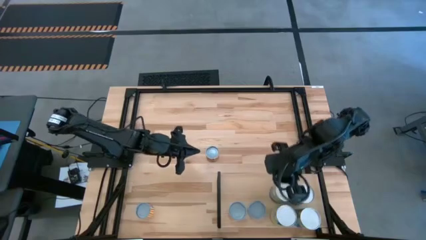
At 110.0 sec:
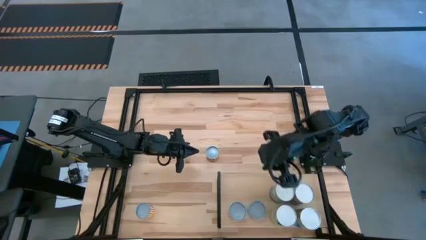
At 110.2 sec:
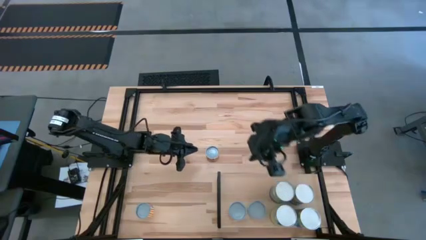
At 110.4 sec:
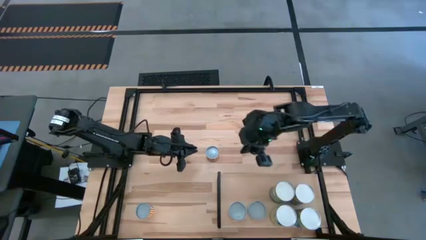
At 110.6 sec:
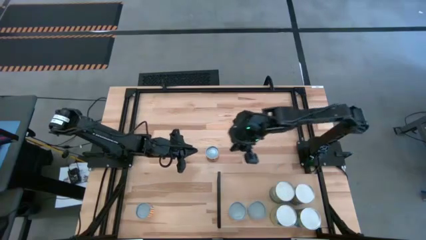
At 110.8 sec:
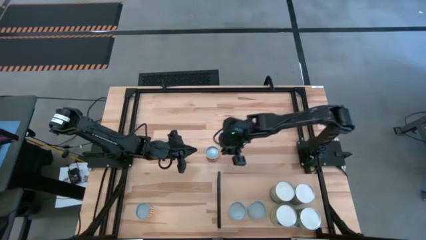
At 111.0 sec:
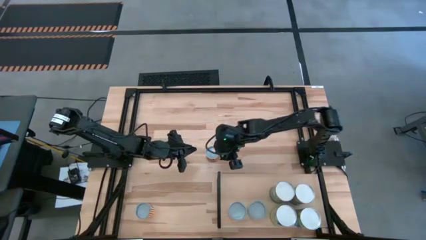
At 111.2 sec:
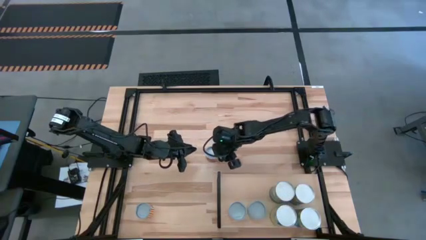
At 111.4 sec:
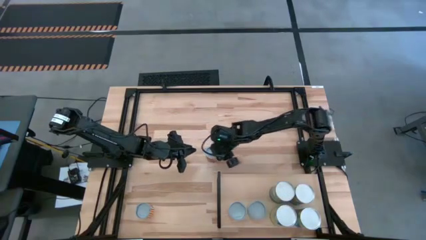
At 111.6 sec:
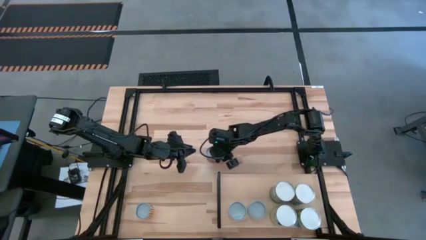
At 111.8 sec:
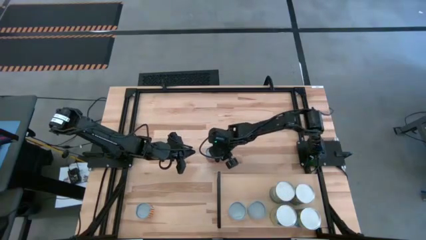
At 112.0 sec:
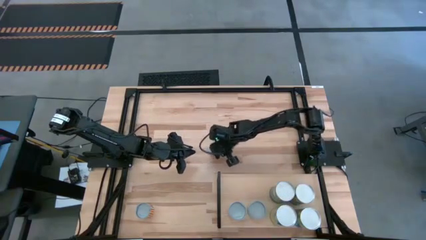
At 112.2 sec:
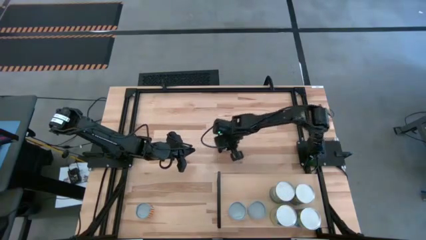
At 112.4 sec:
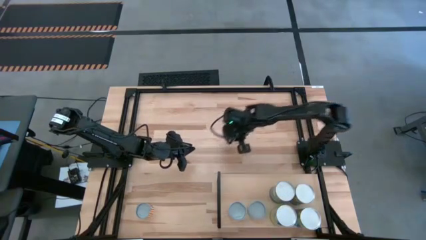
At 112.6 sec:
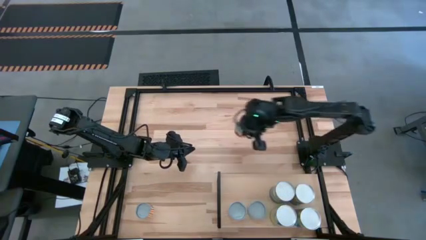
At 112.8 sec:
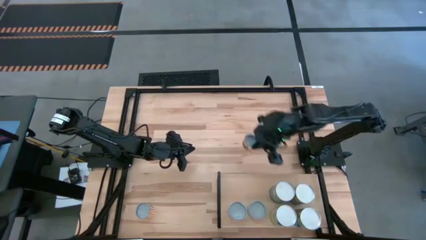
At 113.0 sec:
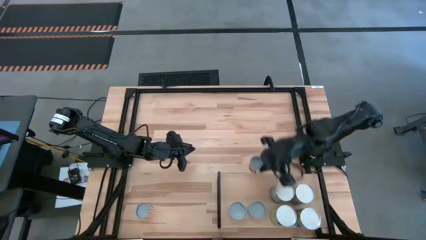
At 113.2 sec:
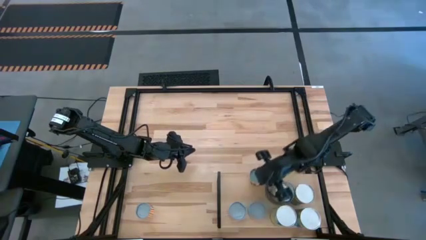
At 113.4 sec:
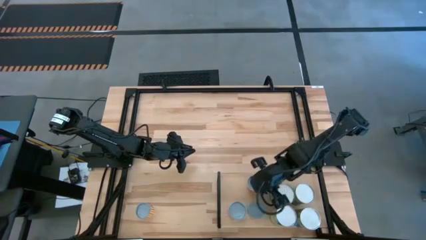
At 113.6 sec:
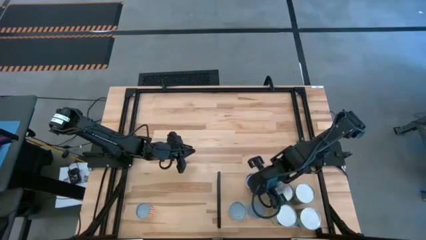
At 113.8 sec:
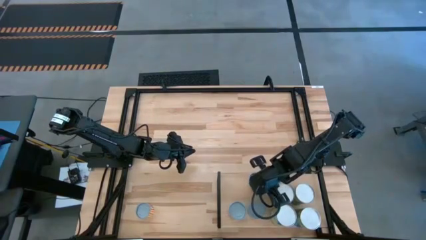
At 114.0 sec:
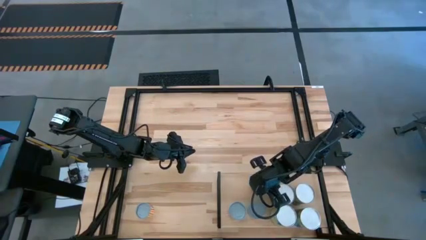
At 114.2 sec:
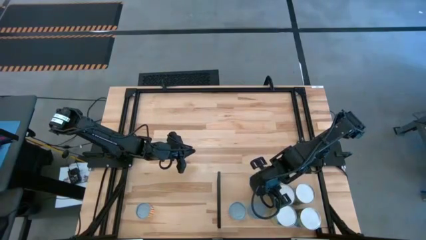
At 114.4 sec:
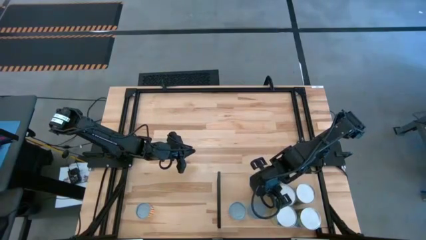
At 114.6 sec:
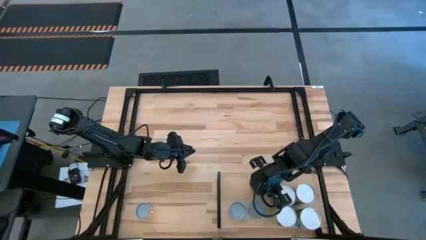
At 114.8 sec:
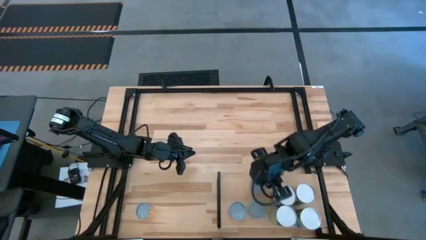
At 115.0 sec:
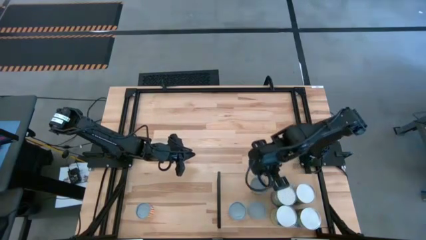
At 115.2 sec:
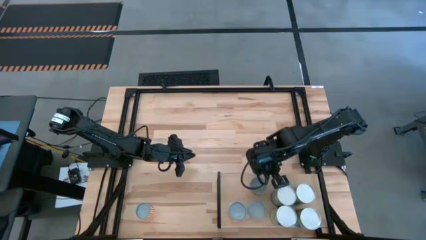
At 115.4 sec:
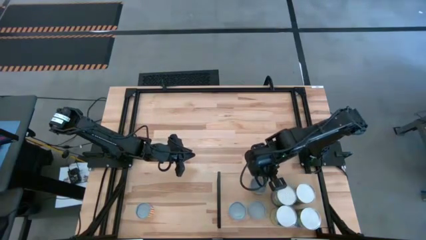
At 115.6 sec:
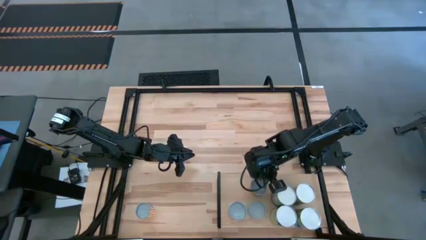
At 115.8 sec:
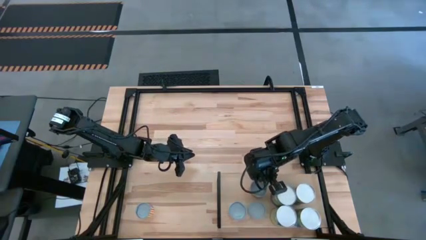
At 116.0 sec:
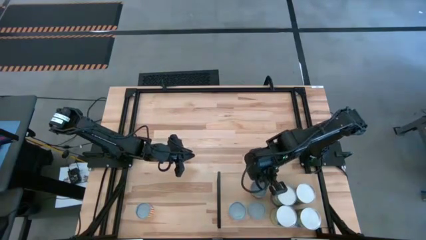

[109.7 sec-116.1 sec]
Task: Pick and place cans onto a shelf
Put the canned pineapple rings on the shelf

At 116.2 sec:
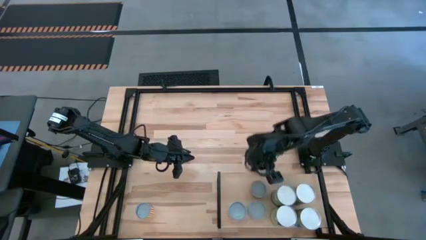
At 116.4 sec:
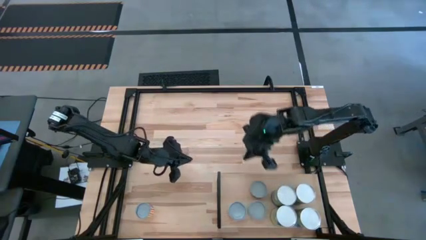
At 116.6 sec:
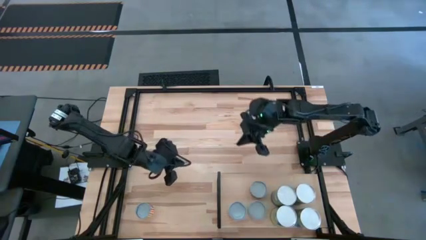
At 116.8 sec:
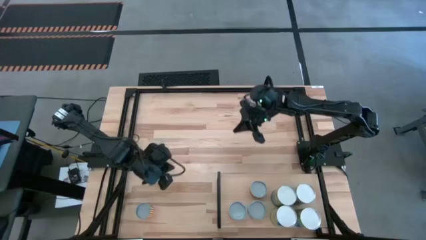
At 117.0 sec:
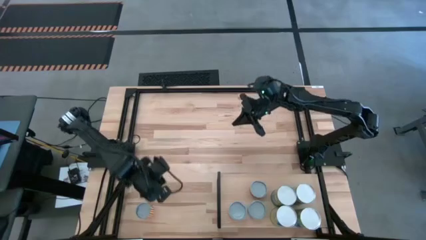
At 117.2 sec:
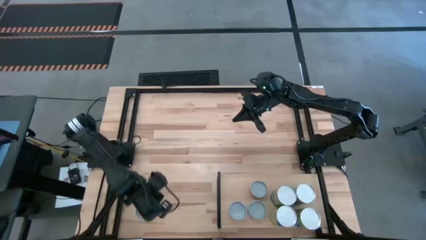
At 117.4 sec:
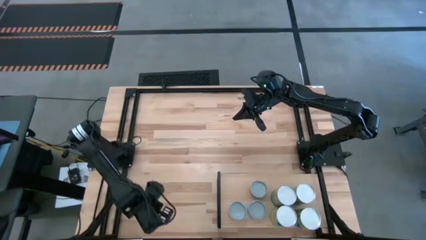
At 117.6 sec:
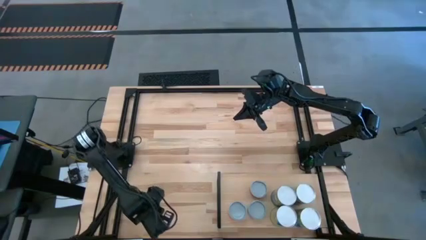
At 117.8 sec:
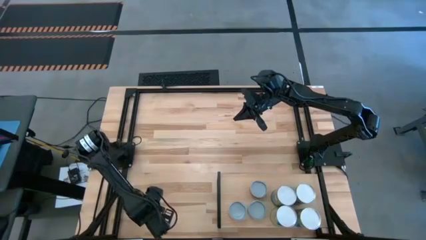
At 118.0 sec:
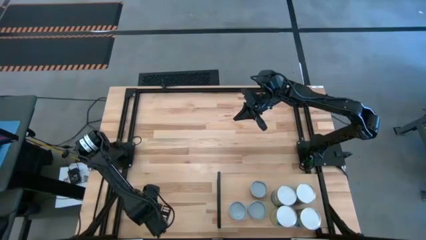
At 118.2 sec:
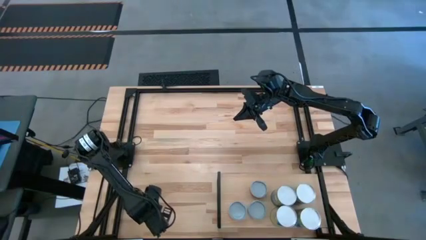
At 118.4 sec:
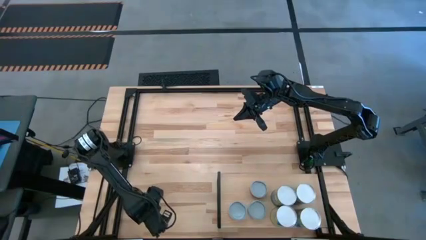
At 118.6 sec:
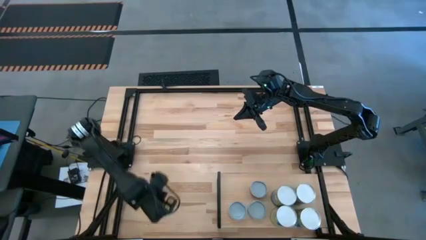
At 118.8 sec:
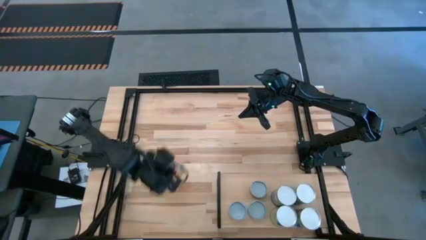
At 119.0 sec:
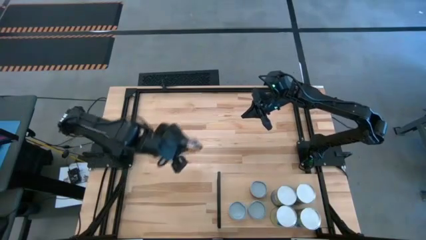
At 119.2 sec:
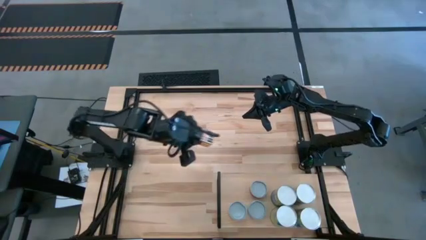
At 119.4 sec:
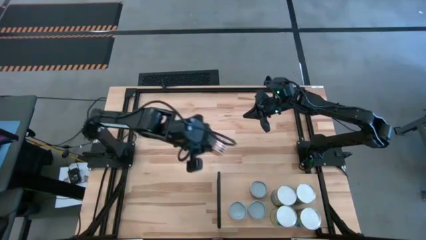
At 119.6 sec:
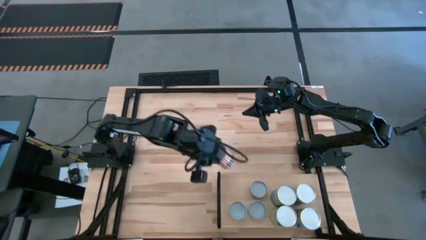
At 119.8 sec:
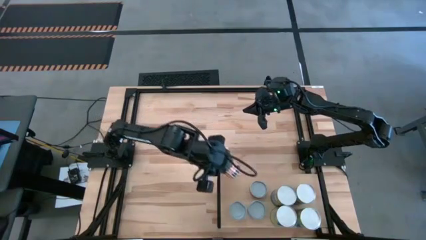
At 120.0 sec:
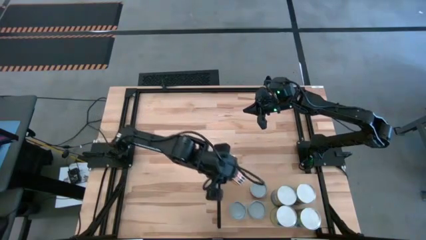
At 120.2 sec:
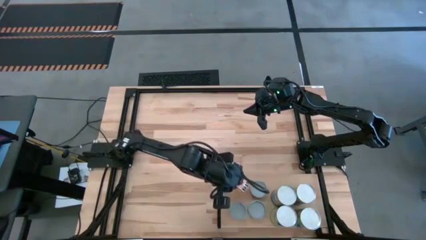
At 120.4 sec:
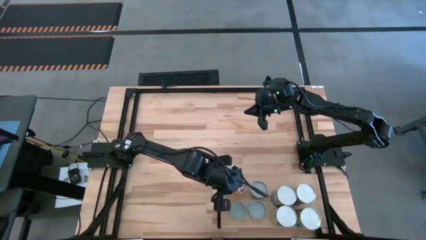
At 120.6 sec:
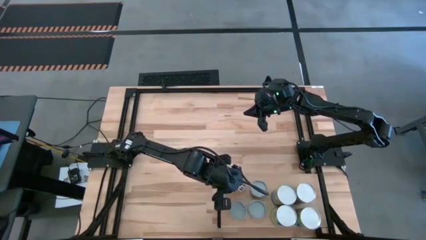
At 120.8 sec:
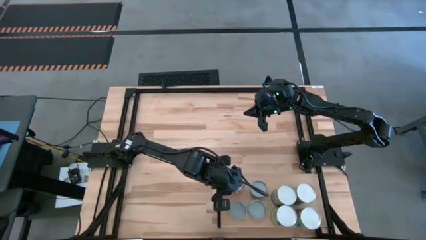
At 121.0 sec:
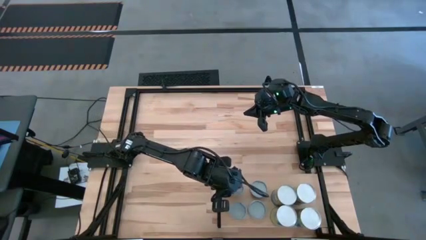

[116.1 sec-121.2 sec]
Put the canned black beans on the shelf

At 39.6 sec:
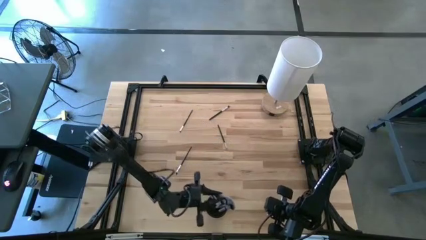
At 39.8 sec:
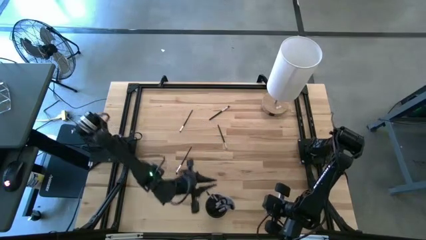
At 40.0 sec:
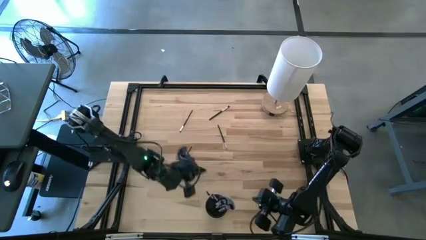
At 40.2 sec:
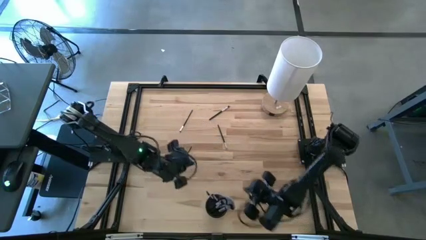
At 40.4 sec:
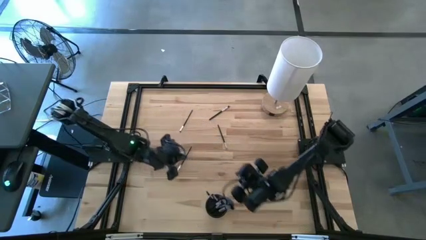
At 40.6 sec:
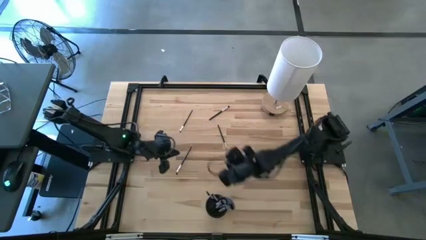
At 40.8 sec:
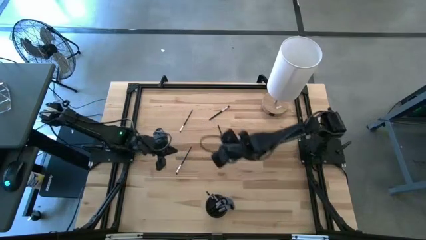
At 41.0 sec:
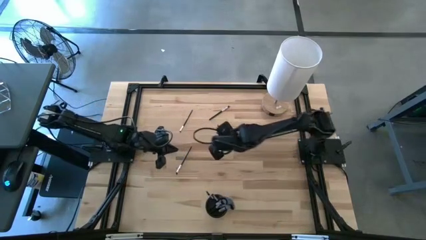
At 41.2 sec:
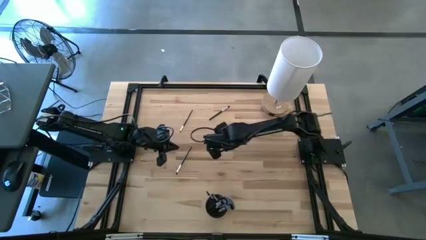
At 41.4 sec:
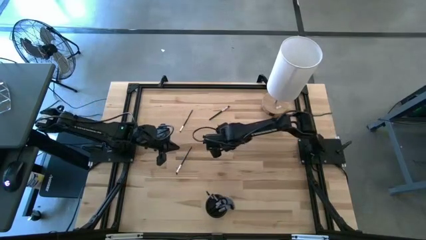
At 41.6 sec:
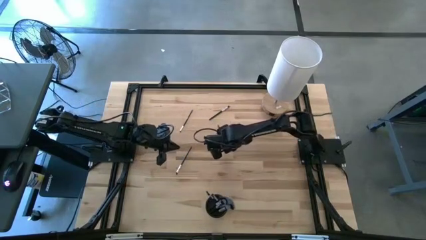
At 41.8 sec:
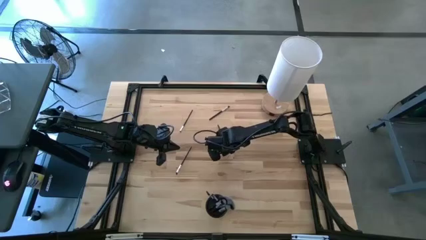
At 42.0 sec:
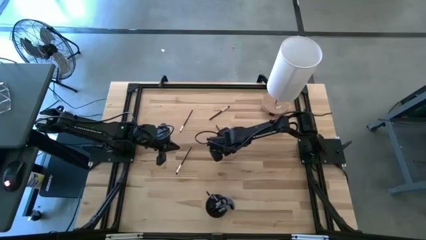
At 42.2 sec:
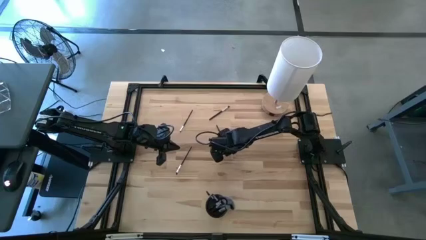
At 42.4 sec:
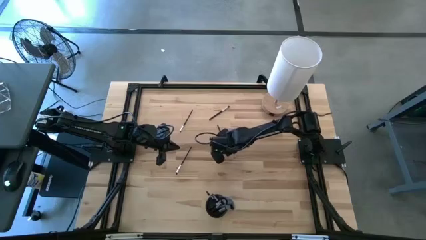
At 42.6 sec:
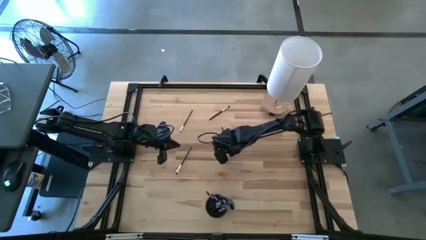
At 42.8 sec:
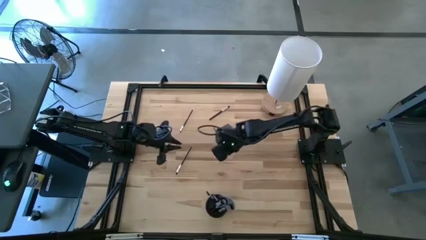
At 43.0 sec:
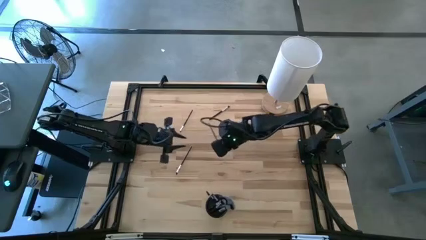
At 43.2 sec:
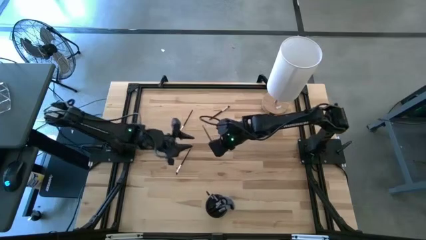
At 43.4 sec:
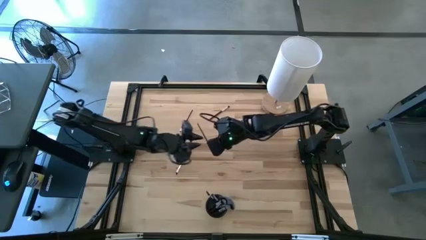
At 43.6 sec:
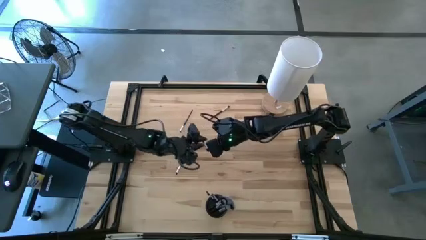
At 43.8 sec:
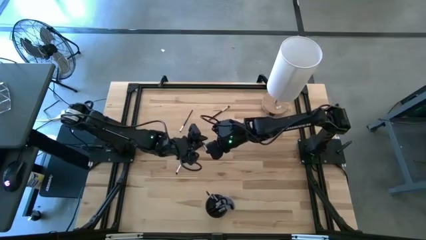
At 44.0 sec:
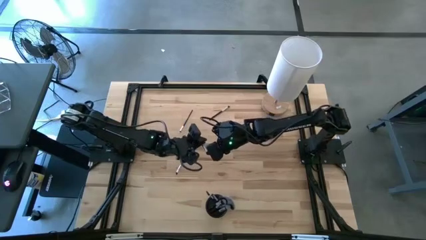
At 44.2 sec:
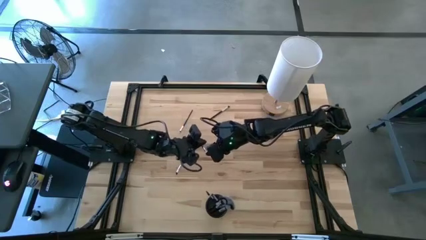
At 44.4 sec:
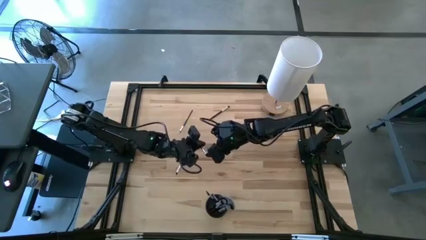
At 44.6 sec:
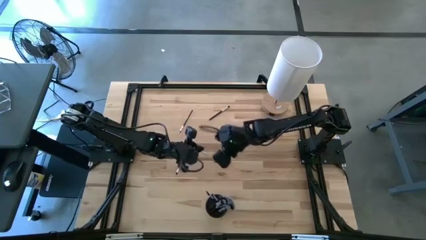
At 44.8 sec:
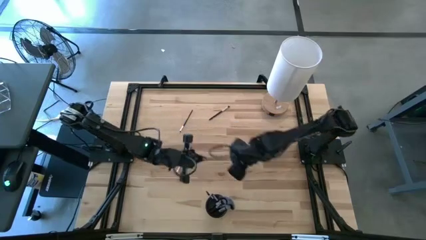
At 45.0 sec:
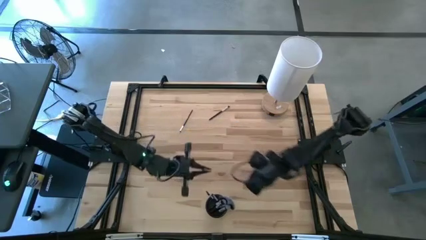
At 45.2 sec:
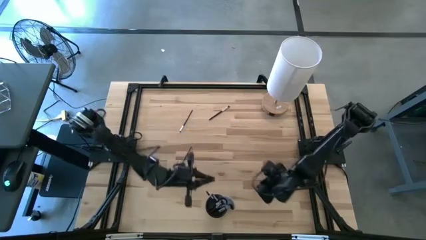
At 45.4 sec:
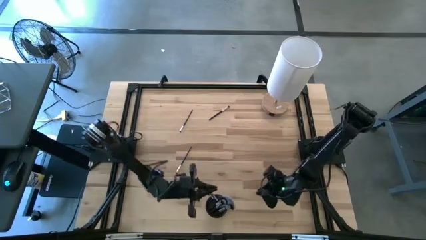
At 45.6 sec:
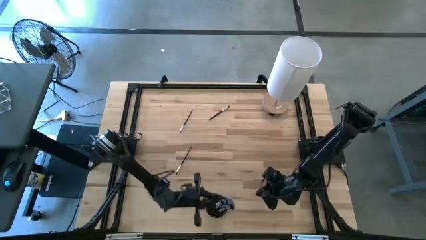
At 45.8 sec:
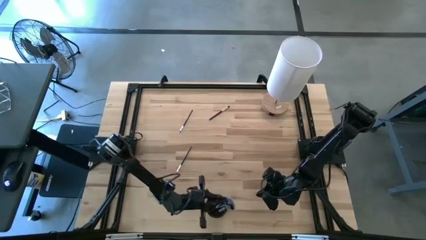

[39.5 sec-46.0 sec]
Task: Put items in baskets/containers
Put the black eyeshadow brush into the black pen holder
